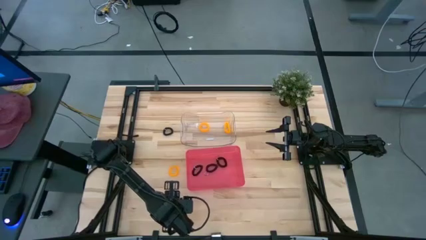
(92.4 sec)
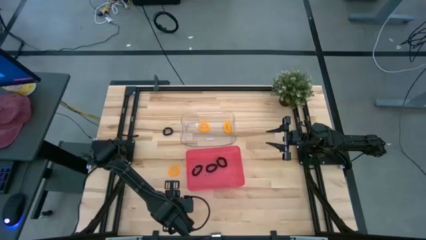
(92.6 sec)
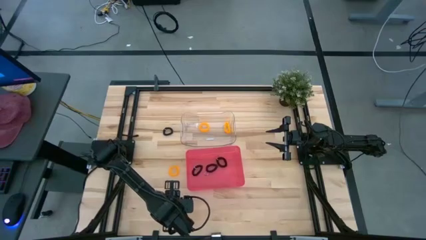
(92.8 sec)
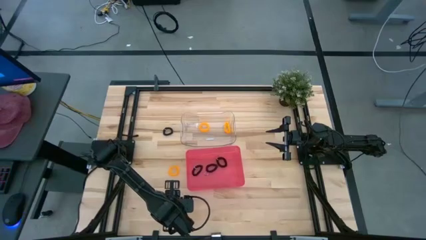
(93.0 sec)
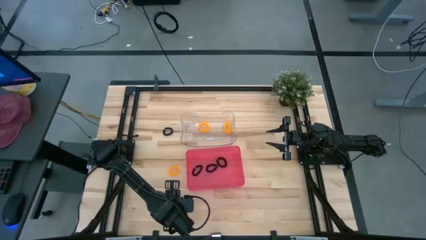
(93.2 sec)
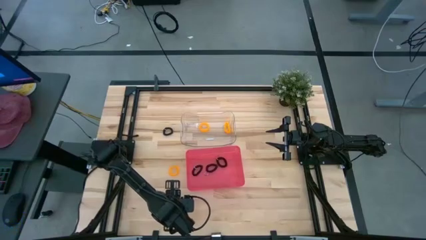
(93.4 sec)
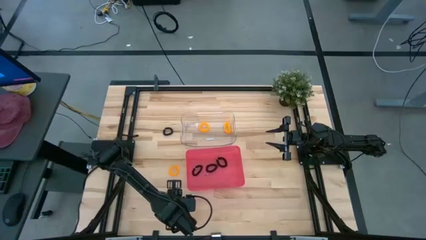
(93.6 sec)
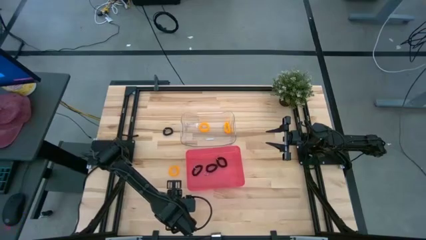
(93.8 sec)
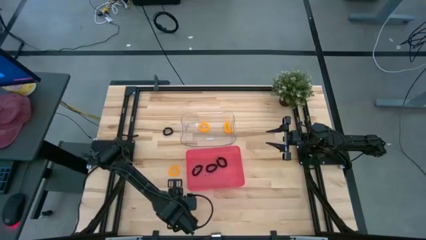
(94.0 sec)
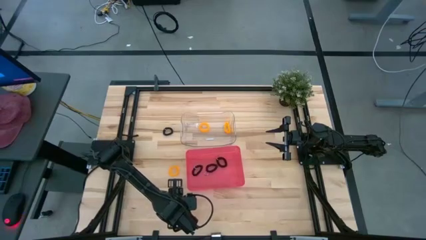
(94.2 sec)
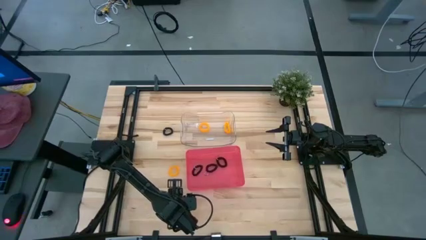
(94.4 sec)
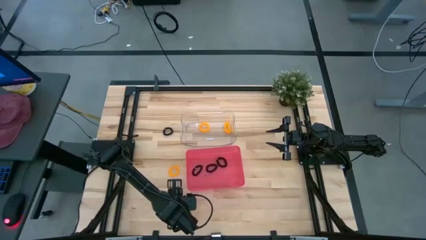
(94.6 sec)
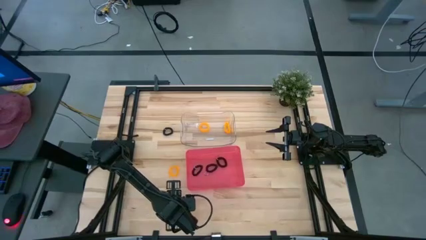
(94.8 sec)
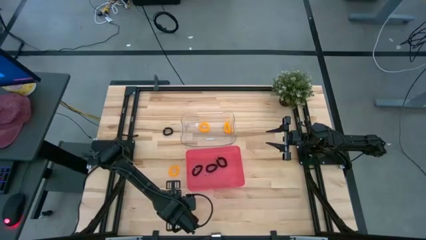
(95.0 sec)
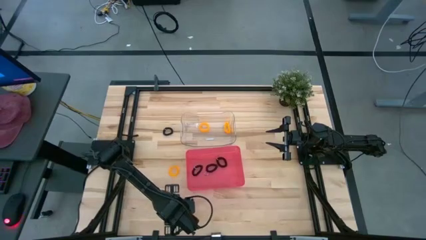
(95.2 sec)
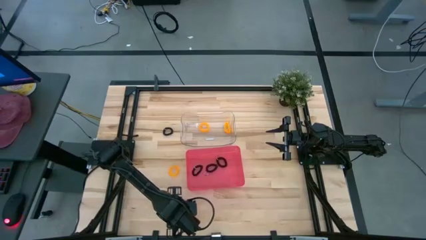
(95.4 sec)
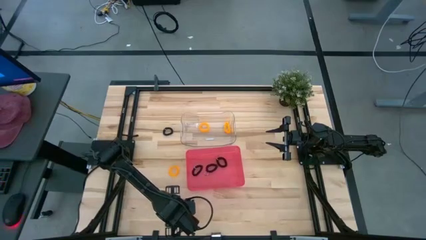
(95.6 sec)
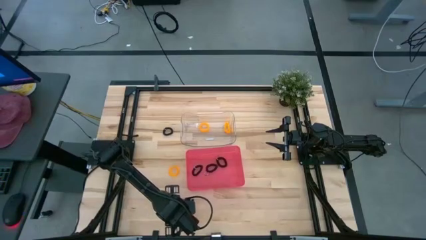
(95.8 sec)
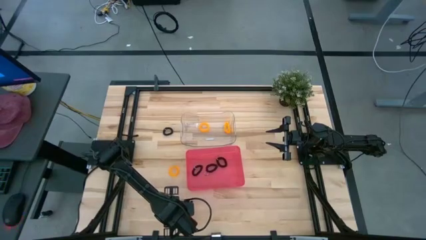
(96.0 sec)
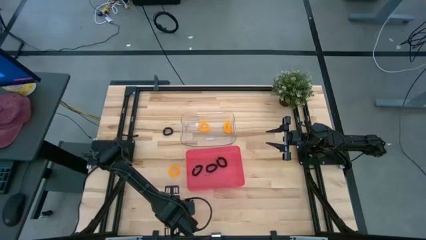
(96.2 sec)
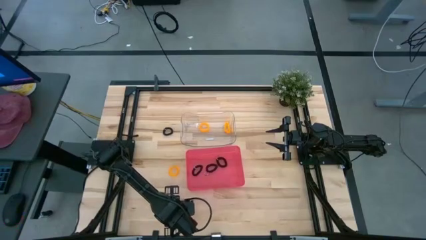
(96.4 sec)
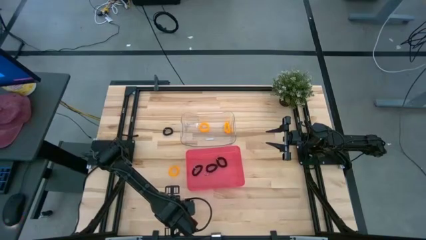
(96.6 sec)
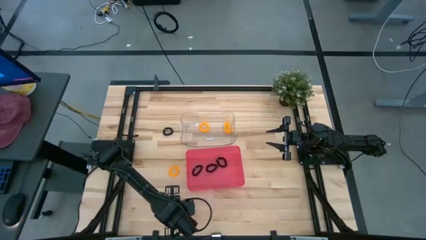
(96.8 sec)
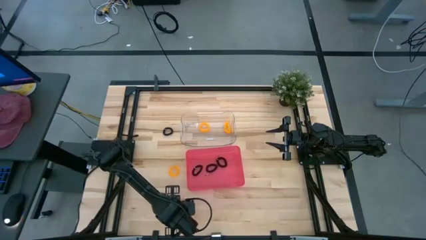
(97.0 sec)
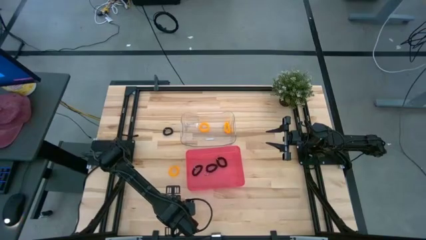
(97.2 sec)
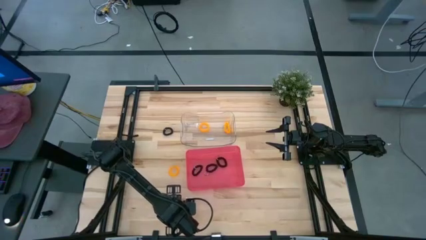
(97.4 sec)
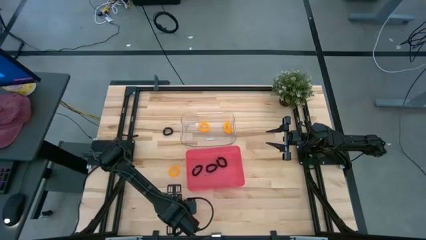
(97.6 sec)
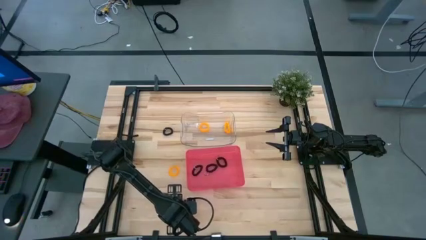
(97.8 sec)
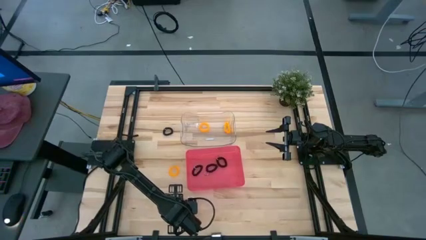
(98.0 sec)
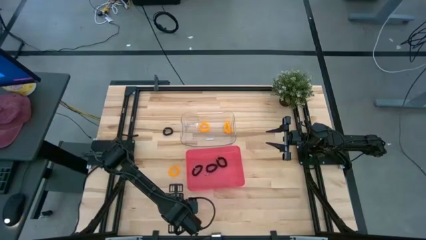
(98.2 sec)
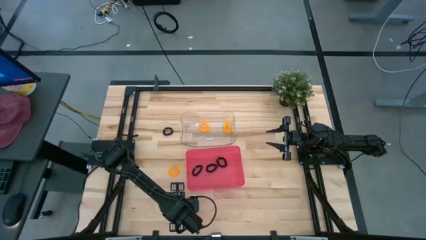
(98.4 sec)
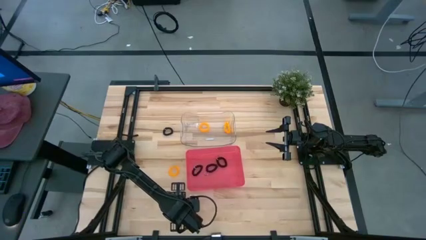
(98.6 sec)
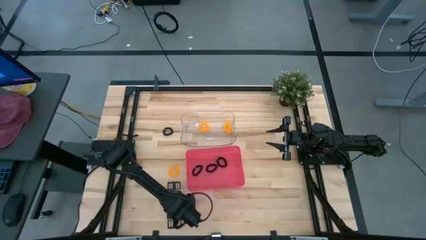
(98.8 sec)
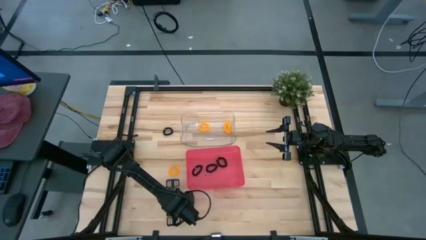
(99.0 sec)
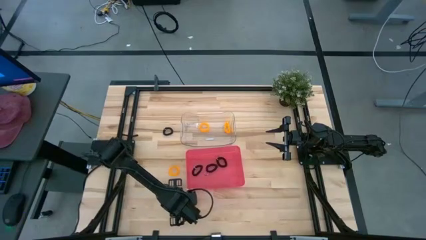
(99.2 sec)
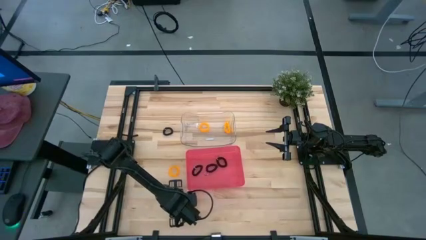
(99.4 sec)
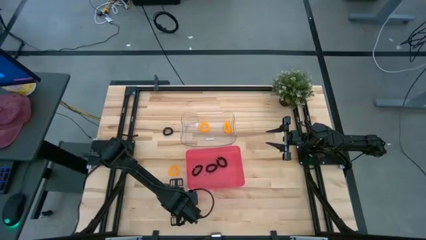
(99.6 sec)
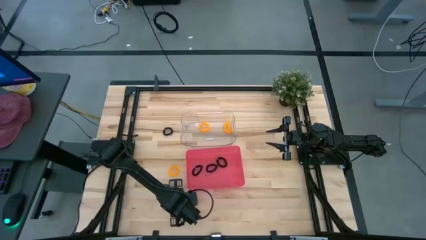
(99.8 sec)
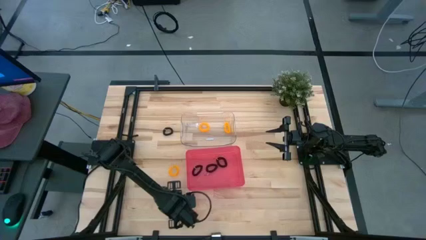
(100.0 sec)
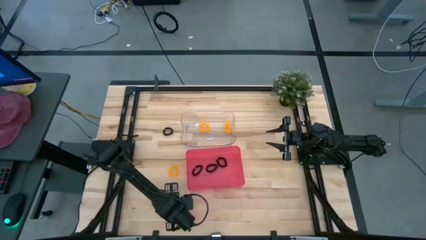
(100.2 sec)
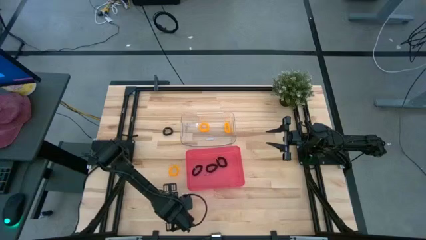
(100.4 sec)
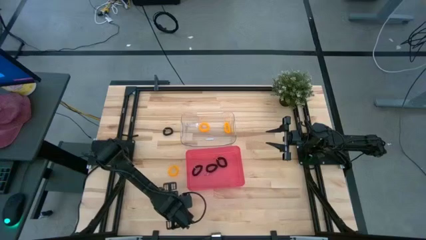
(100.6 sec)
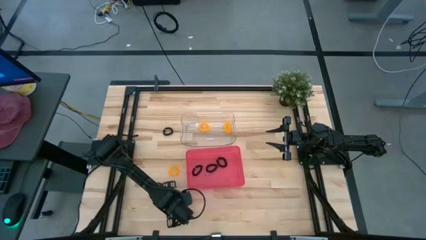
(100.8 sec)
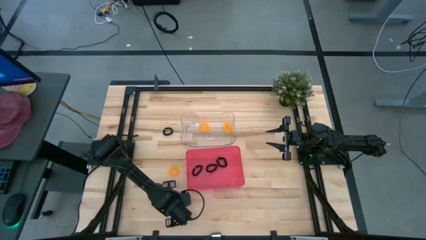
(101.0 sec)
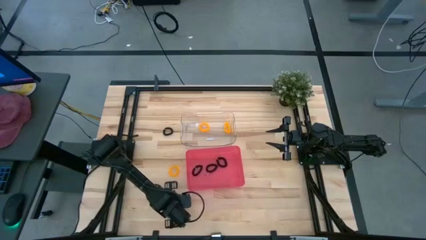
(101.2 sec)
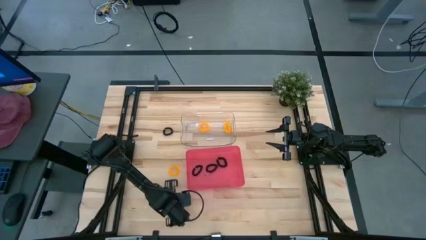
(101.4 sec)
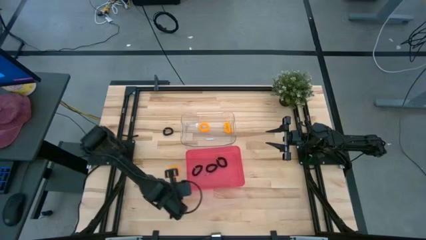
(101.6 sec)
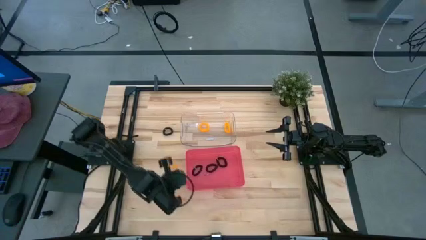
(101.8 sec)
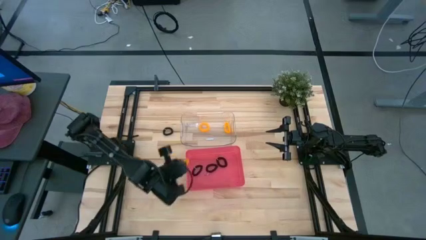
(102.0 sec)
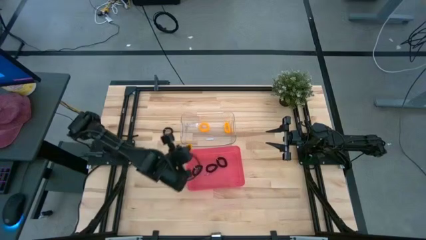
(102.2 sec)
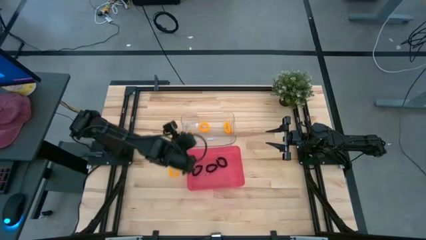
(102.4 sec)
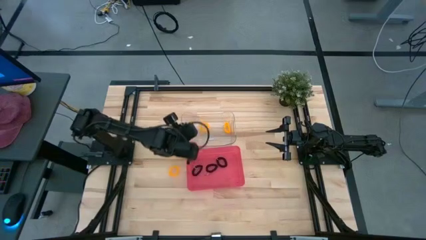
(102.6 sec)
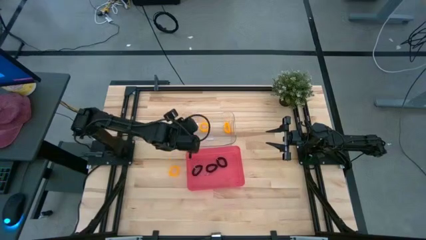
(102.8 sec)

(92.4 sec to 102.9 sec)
Task: Sort spring keychains
Put the yellow spring keychain into the transparent bin

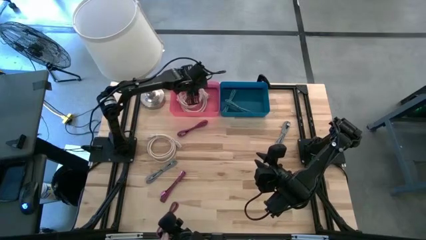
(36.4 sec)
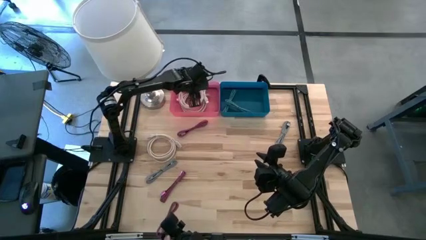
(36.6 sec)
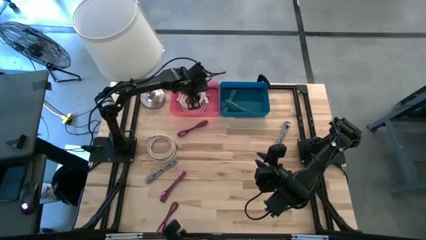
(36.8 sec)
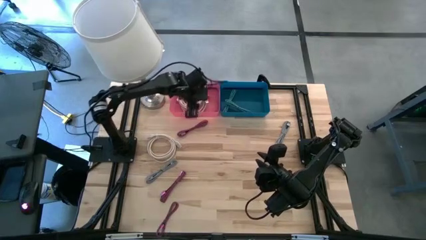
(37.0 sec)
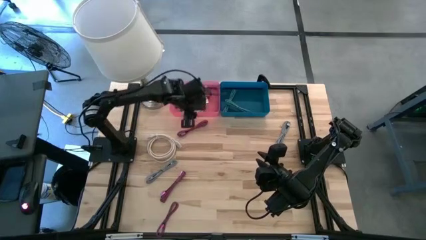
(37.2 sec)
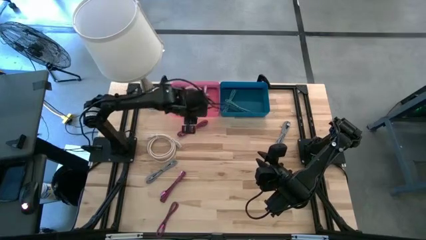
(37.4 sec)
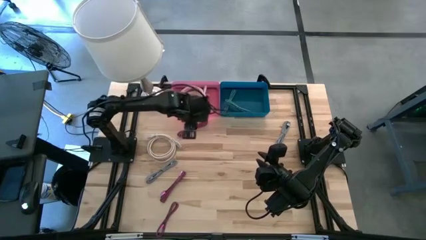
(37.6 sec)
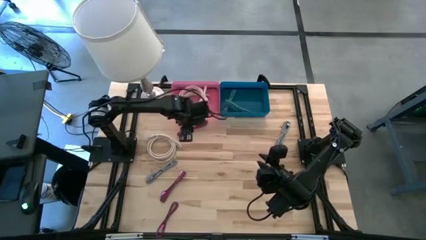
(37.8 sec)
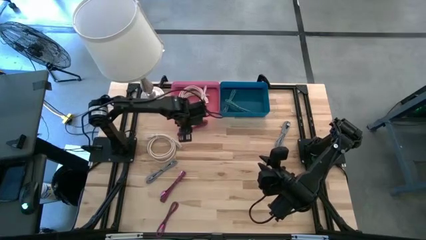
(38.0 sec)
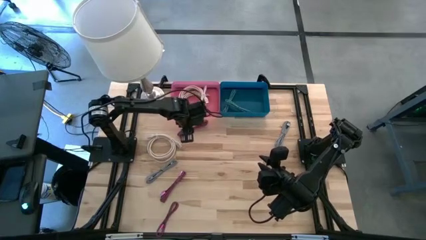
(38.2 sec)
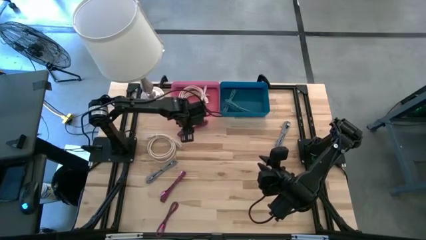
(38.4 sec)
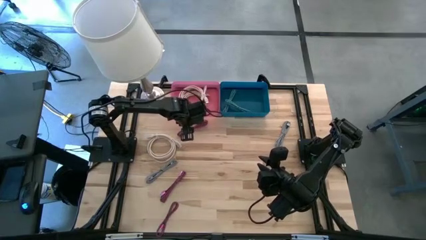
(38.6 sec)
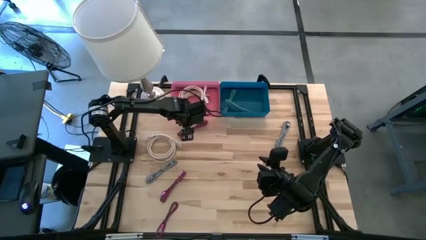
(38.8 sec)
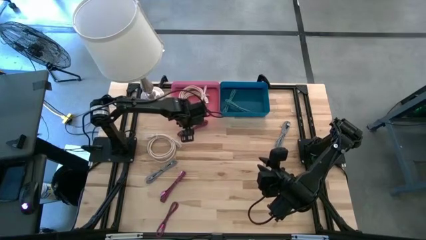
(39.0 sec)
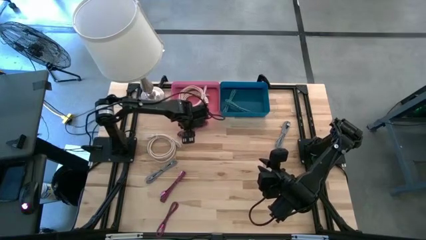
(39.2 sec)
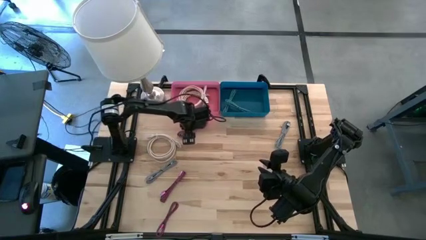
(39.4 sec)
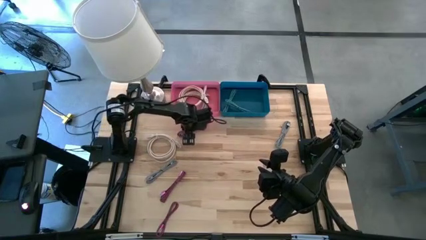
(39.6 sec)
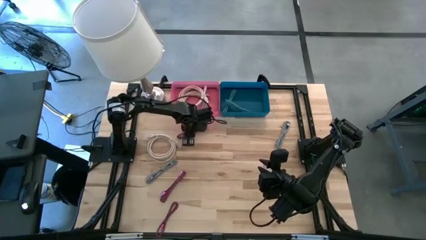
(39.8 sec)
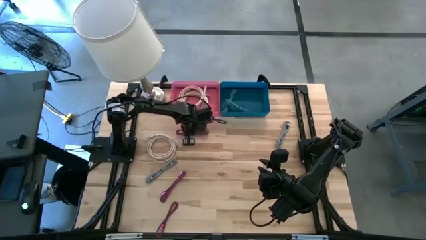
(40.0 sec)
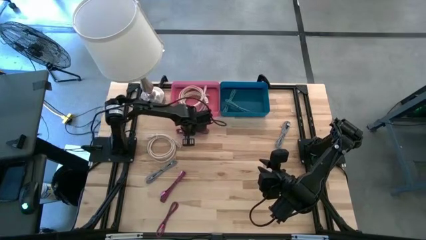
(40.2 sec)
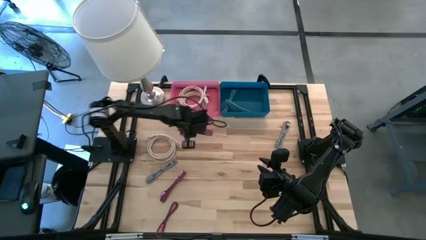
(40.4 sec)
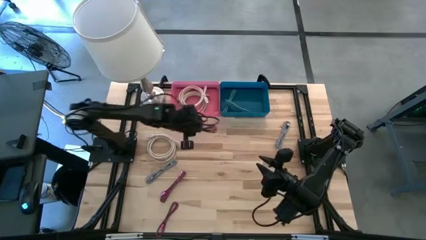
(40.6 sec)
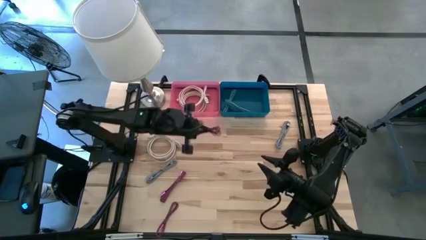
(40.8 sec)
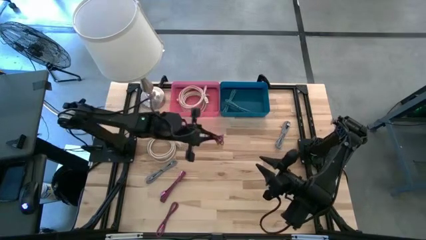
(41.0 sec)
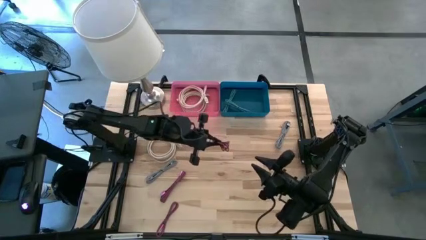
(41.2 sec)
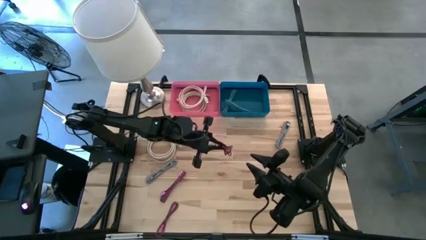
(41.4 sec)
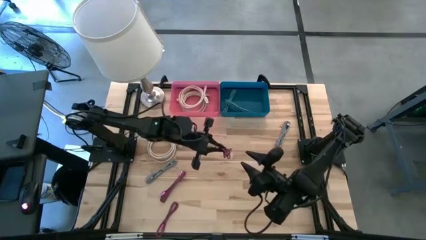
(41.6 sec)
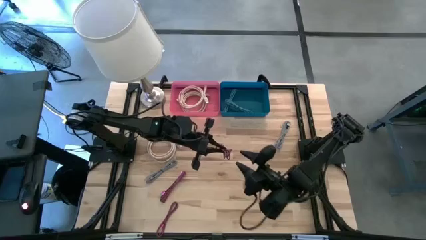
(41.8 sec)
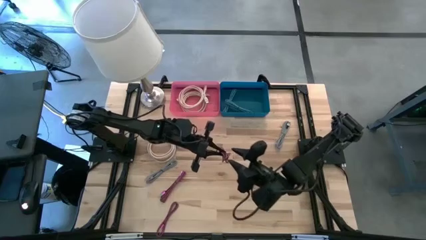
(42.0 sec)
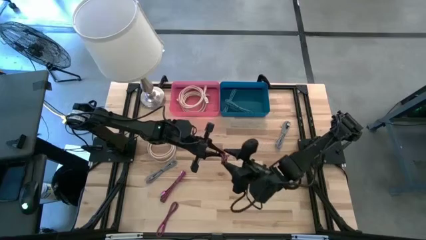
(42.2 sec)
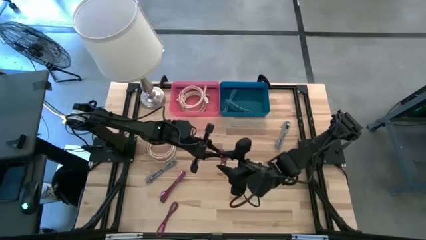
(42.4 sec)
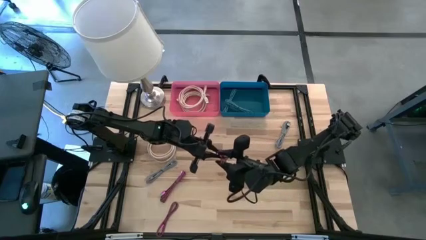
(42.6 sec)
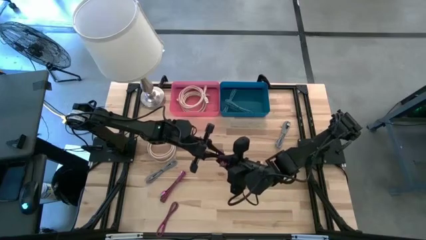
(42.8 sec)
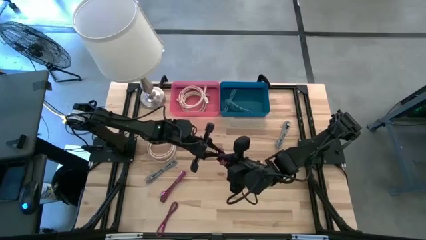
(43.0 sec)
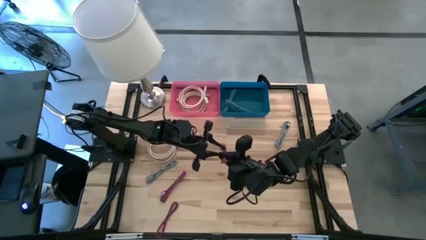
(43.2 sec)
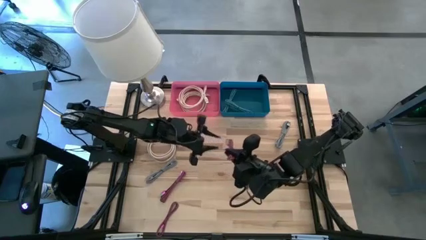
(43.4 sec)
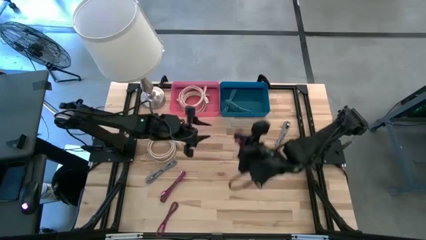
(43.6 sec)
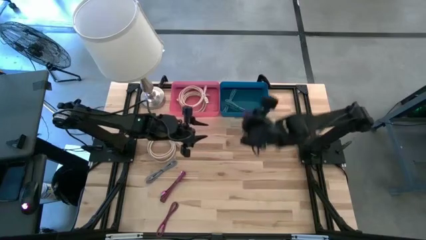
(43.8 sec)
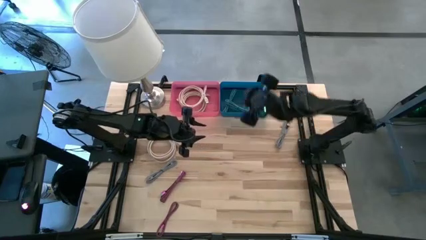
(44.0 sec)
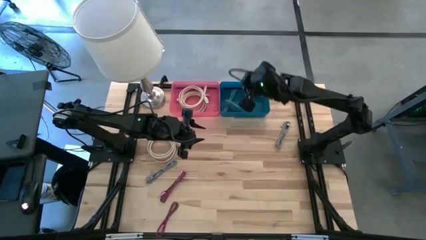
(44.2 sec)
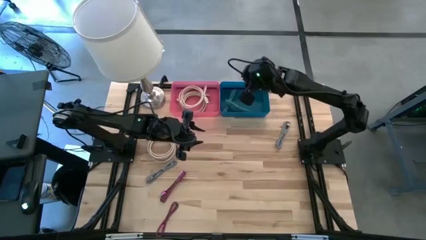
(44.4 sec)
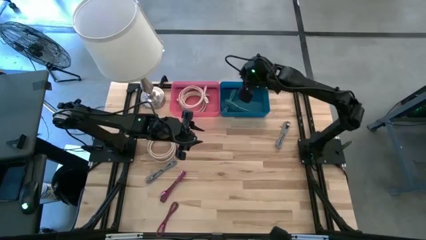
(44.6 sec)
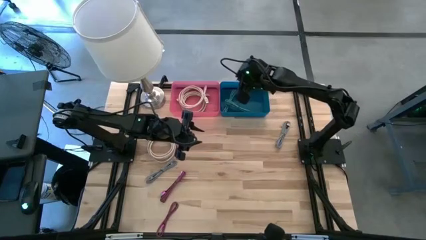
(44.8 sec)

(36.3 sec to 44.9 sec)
Task: Pick & Place USB Port
Put the top small black and pink charger cable into the blue bin
